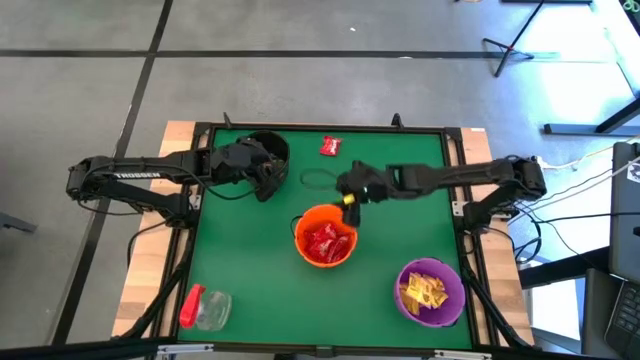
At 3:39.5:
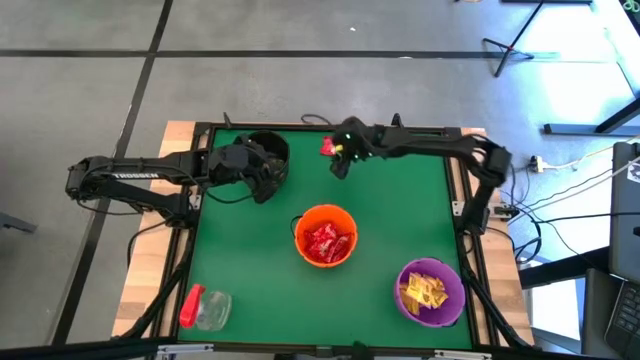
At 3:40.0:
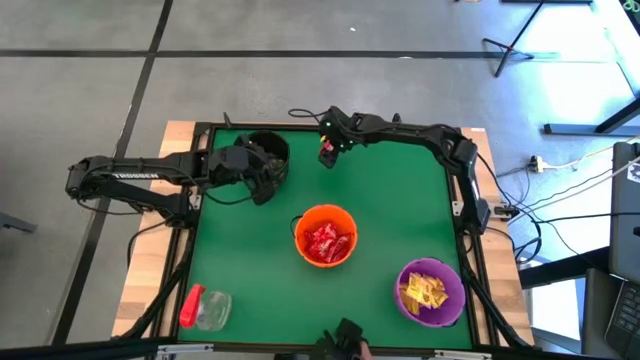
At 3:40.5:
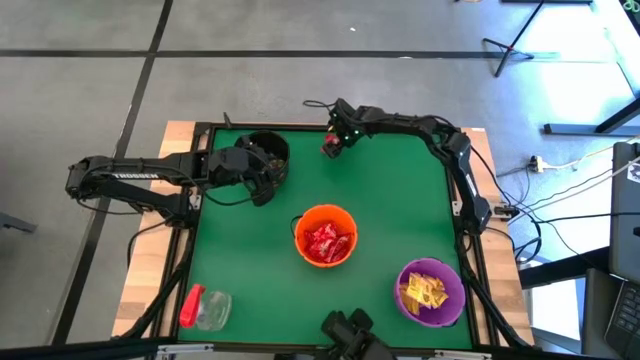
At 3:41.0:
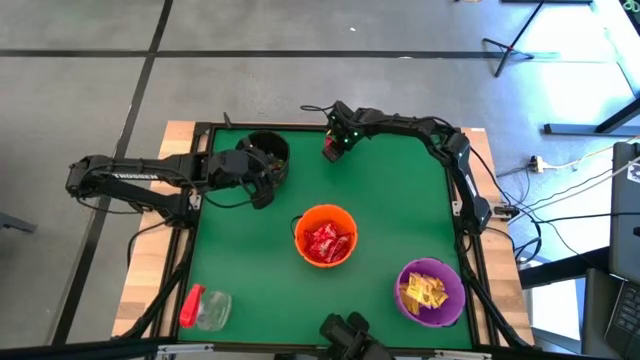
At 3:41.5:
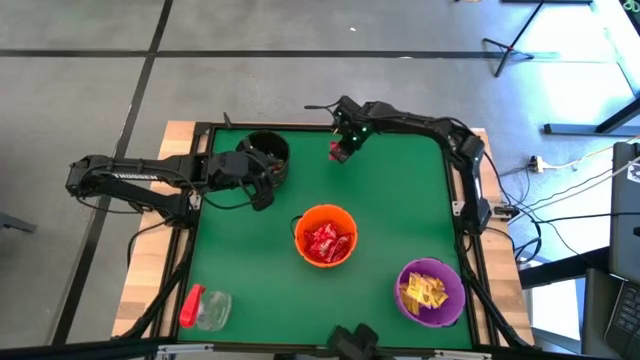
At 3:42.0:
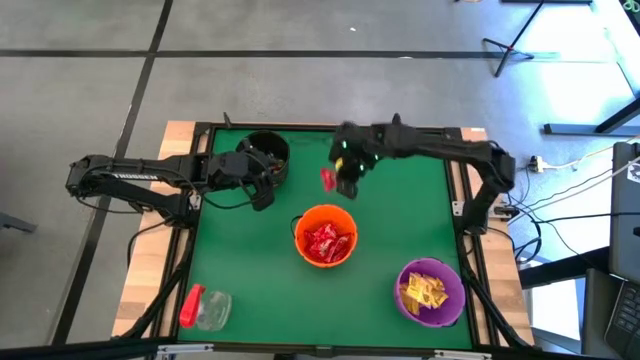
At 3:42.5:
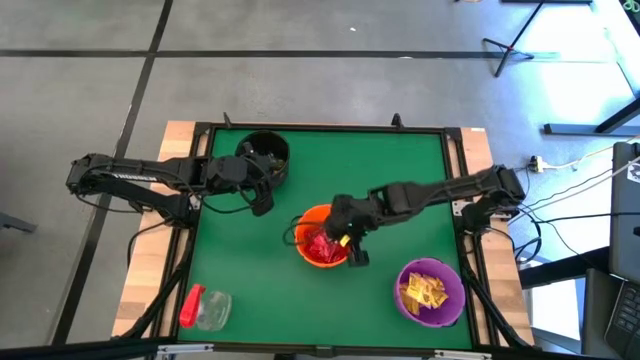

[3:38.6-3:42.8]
Task: Sort candy
Put the red candy into the orange bin

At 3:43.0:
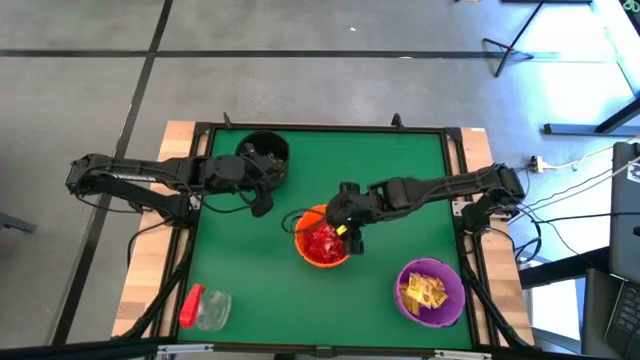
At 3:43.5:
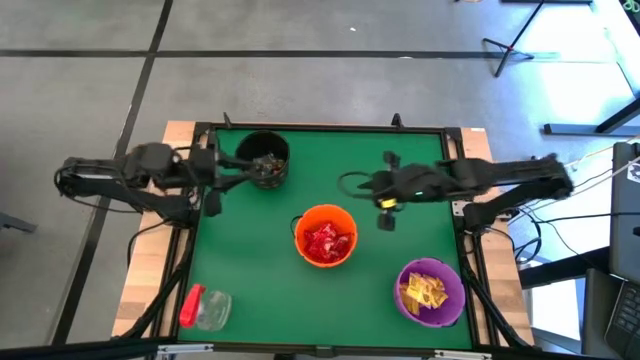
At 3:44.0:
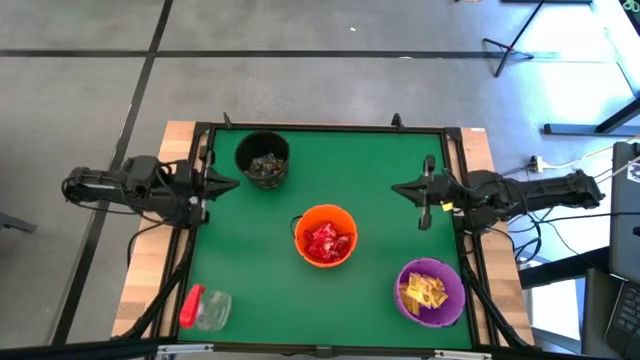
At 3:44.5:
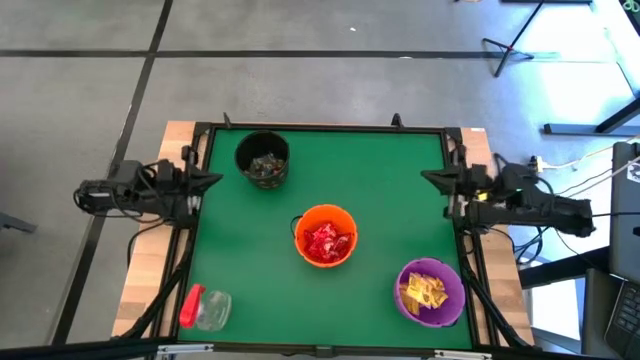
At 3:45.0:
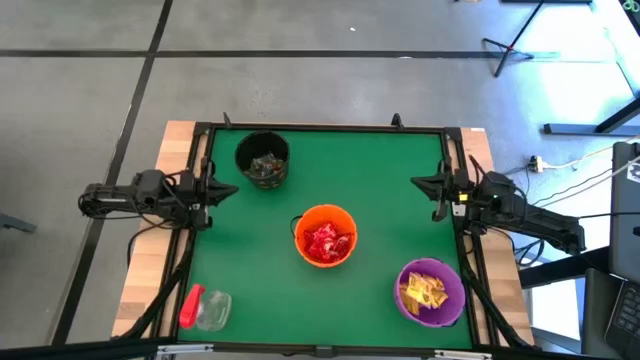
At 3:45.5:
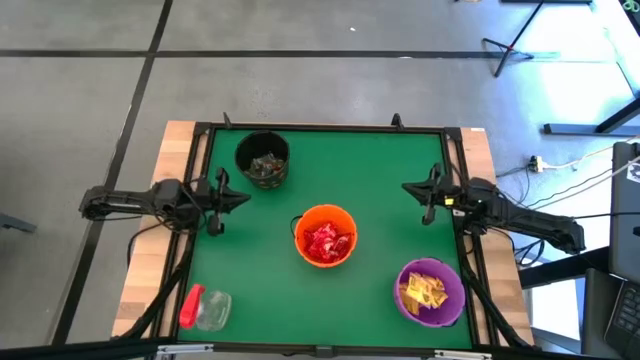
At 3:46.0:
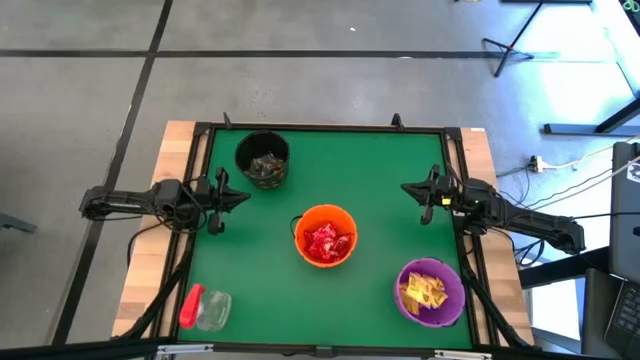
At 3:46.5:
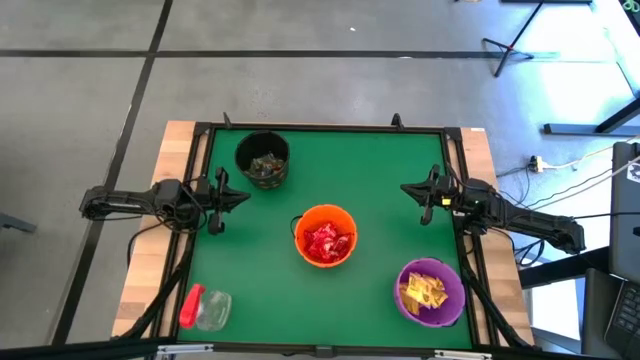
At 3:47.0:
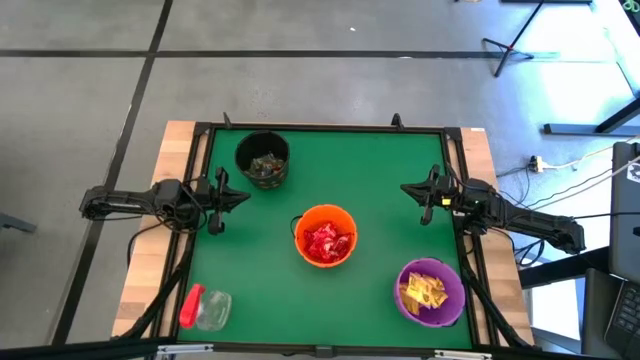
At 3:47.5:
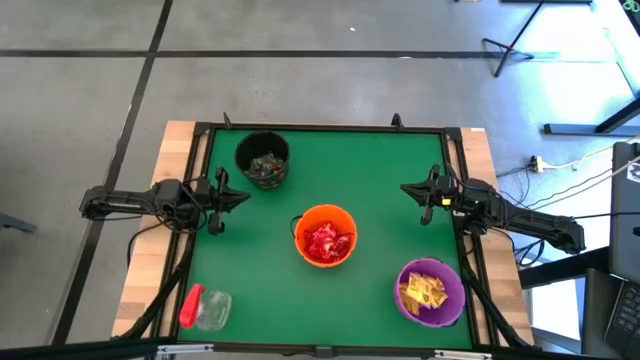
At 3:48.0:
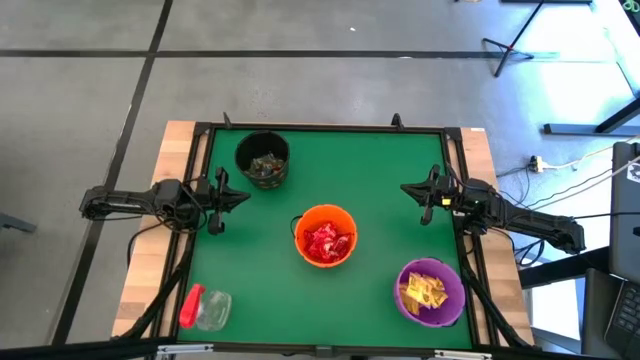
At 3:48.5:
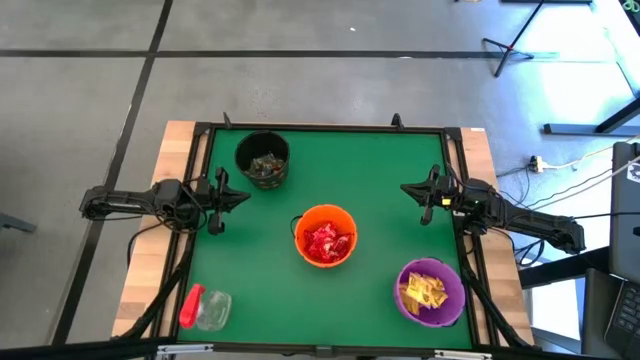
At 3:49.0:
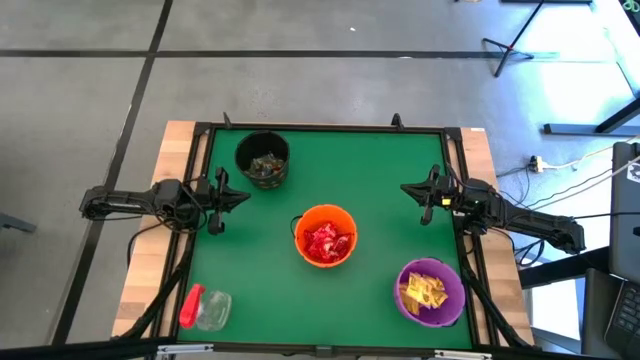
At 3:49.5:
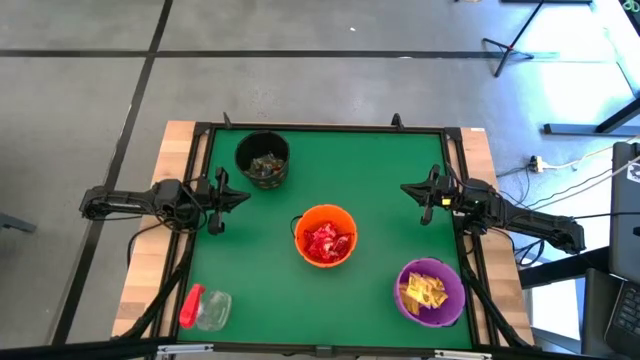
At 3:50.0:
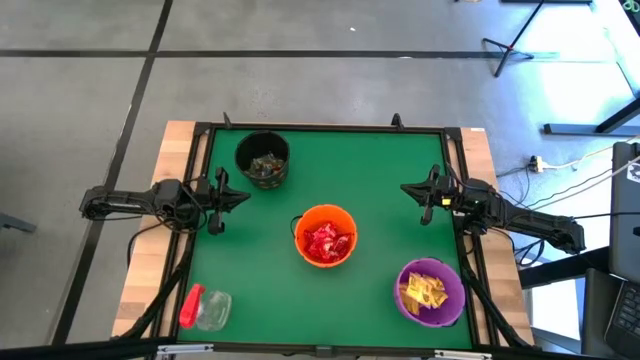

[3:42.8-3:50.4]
Return to Home Position

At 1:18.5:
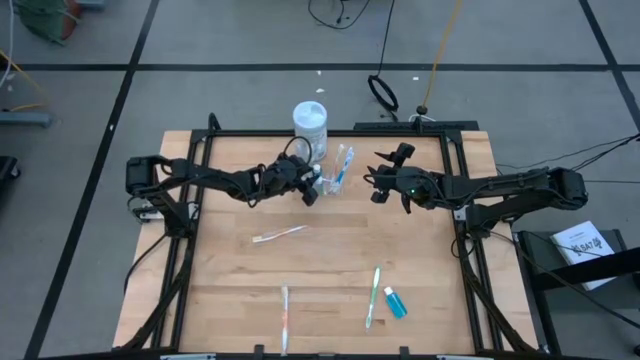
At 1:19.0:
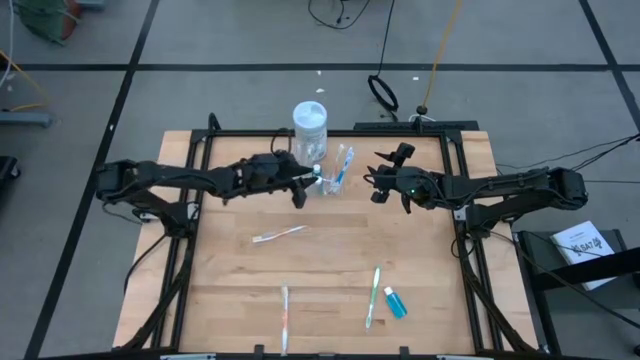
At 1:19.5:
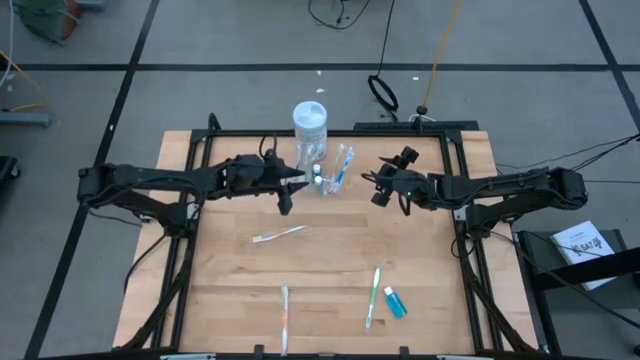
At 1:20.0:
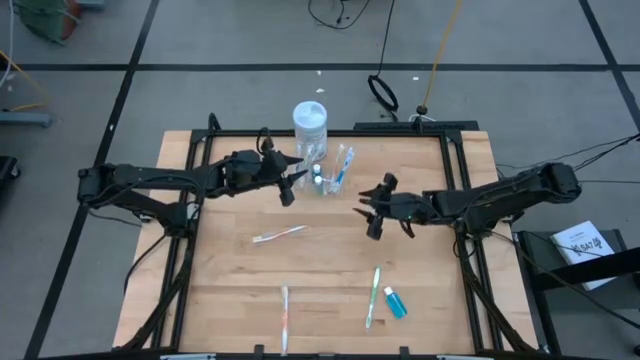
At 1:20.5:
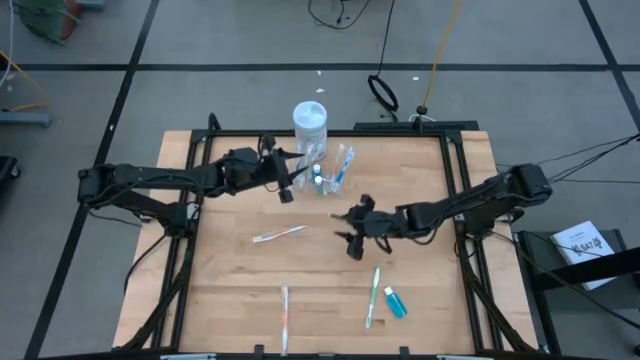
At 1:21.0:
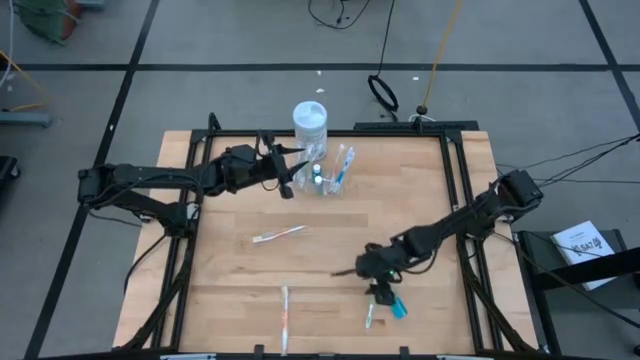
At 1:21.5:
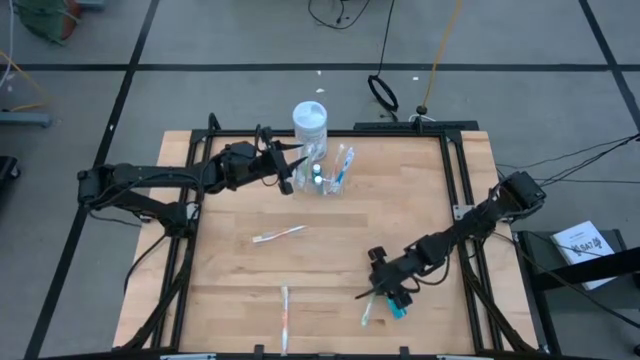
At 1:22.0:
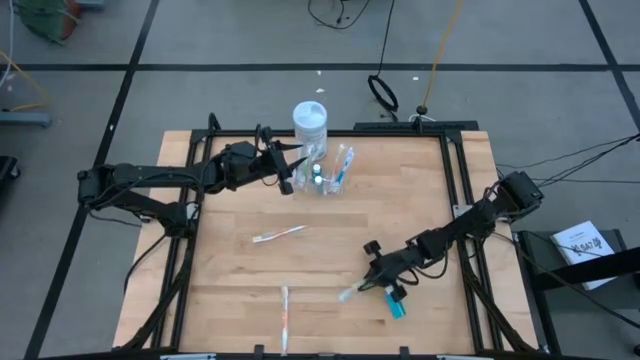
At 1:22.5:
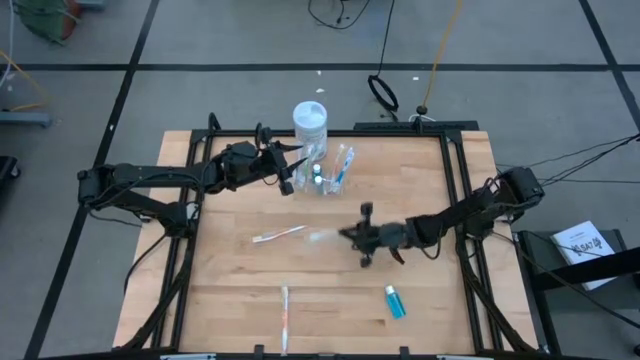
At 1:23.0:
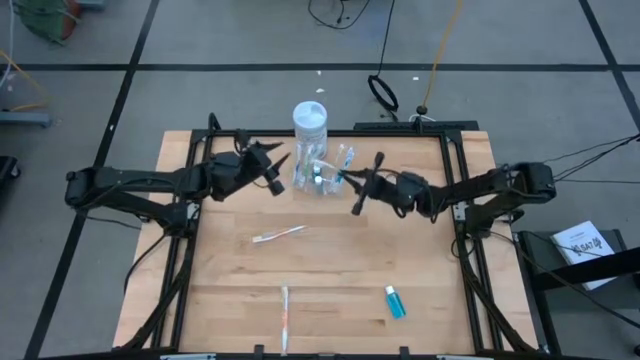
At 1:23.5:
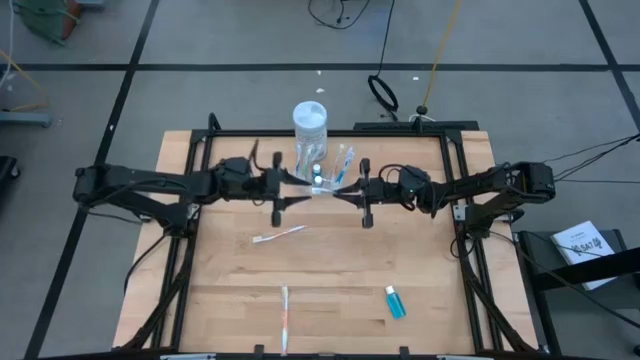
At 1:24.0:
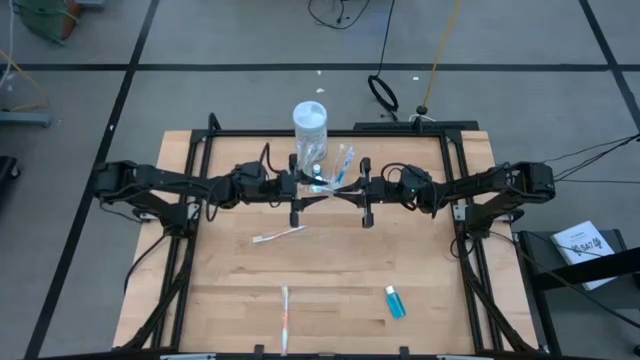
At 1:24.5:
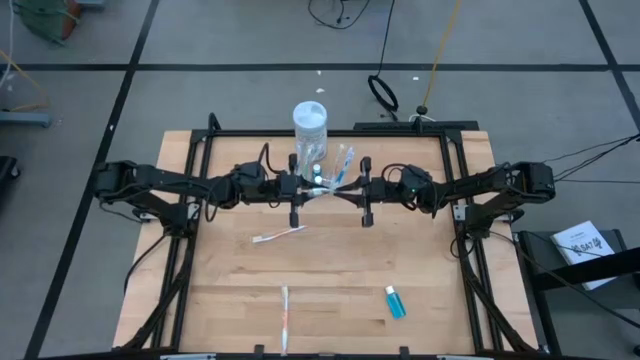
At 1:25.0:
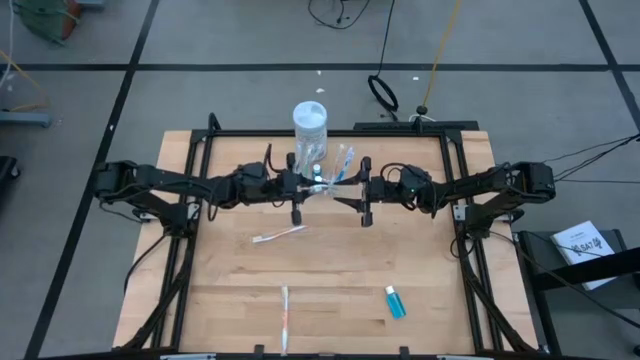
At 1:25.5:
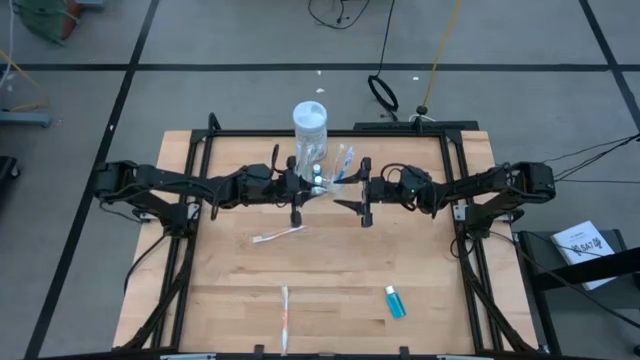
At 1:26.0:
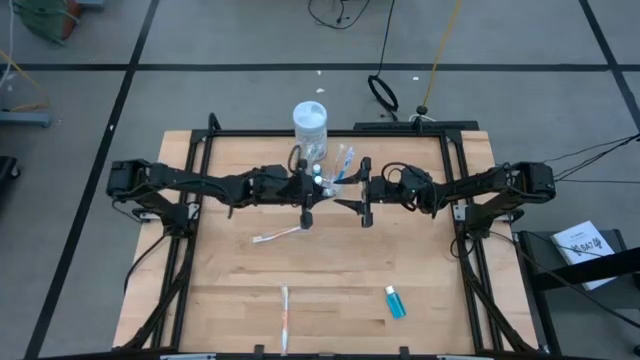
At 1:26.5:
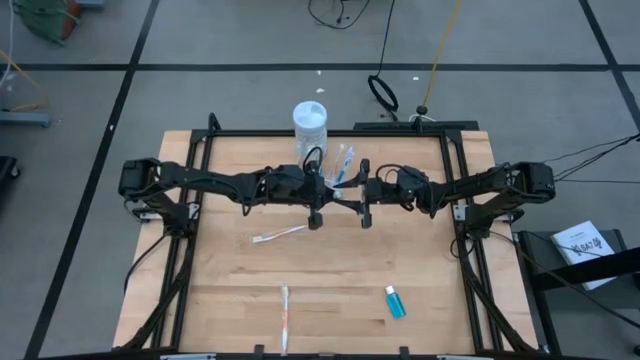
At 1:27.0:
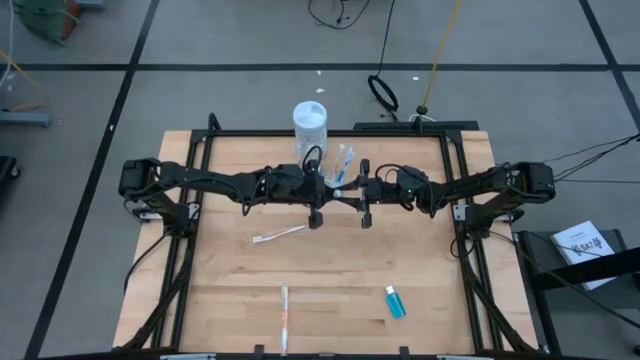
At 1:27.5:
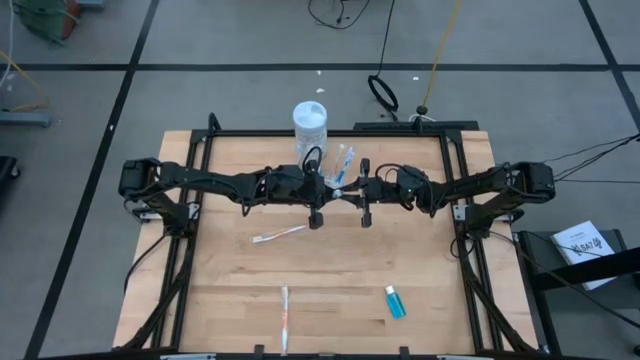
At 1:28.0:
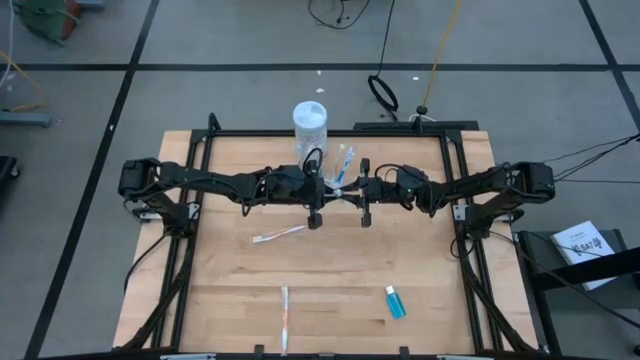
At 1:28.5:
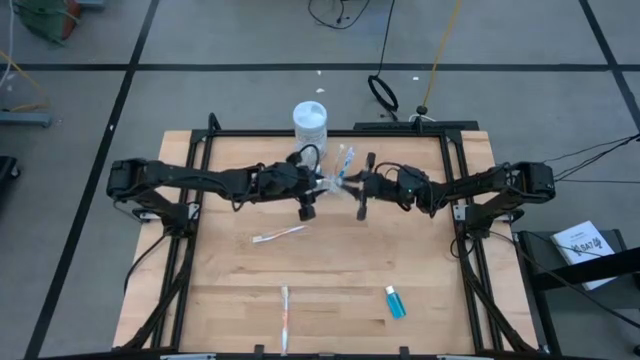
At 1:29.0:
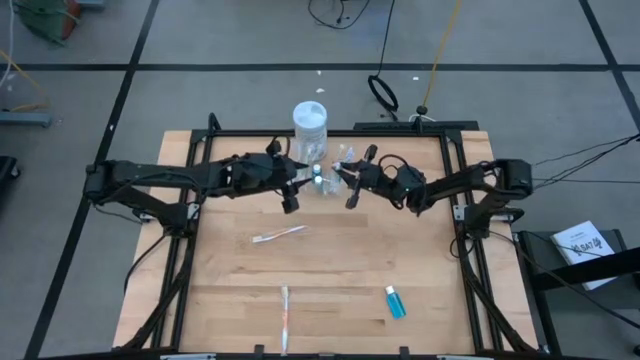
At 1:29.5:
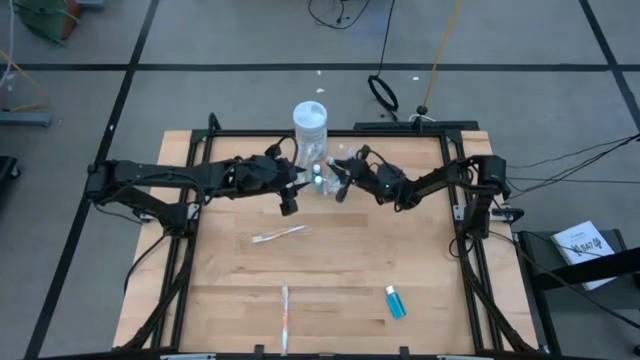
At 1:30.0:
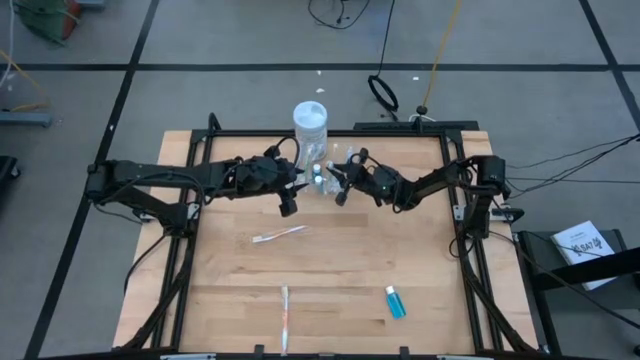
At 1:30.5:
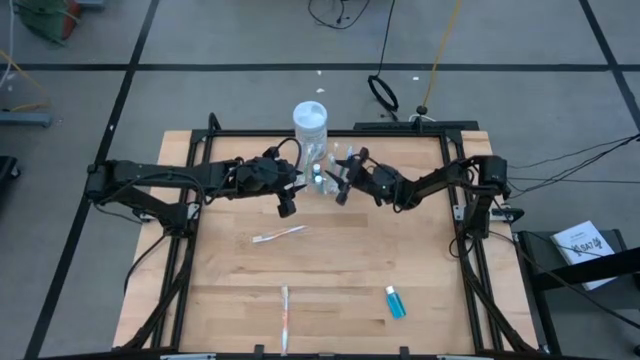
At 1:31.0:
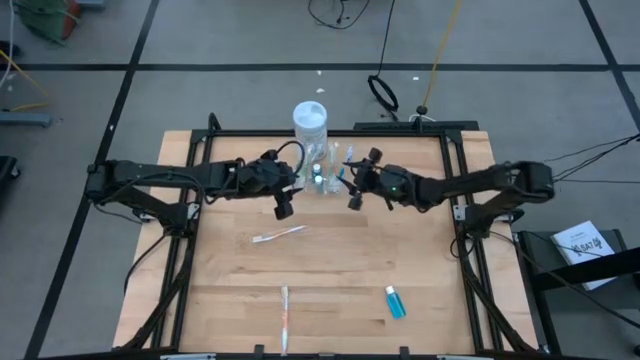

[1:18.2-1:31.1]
Task: Pick & Place toothbrushing station
Put the green toothbrush into the transparent organizer
